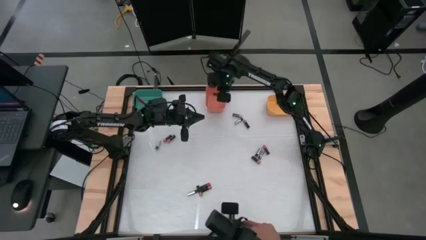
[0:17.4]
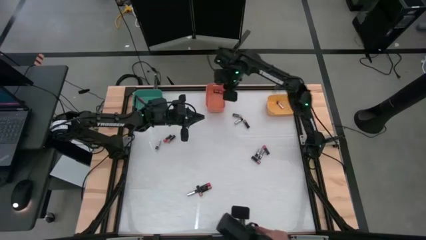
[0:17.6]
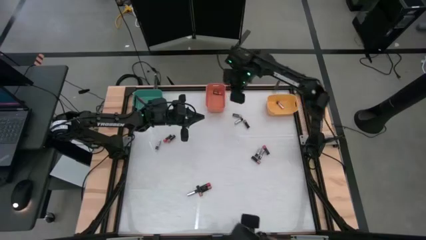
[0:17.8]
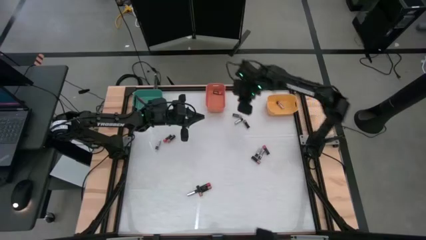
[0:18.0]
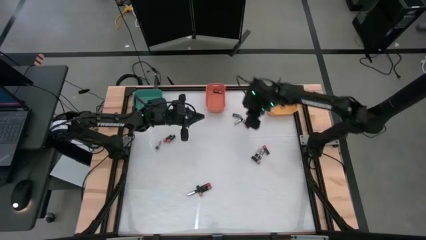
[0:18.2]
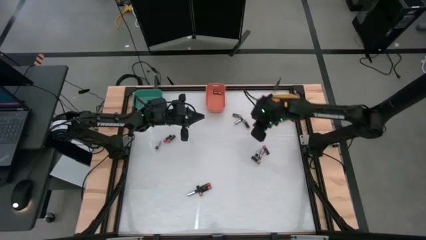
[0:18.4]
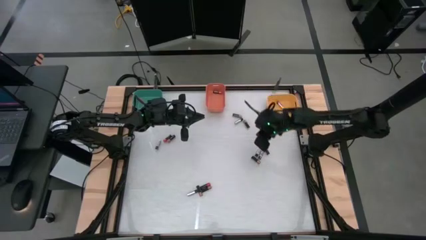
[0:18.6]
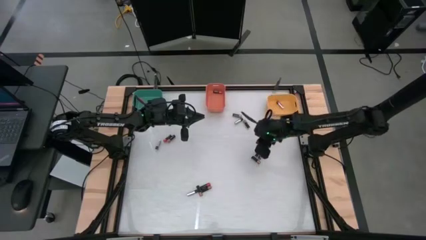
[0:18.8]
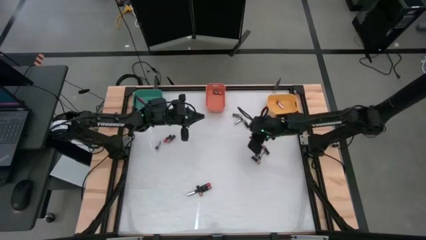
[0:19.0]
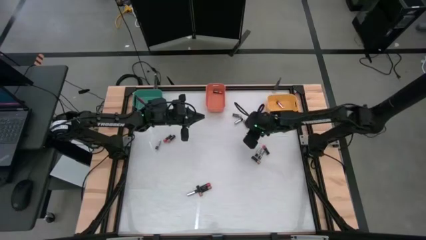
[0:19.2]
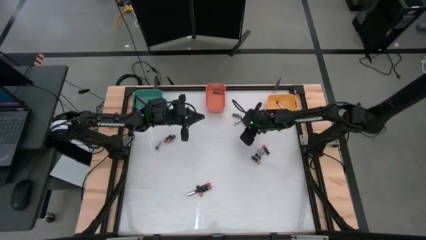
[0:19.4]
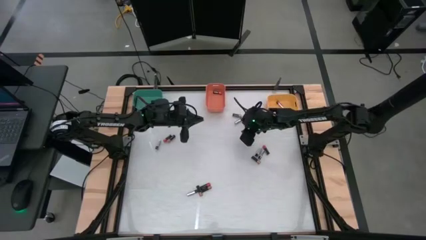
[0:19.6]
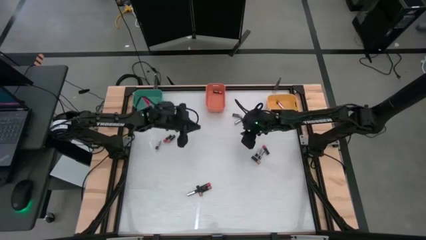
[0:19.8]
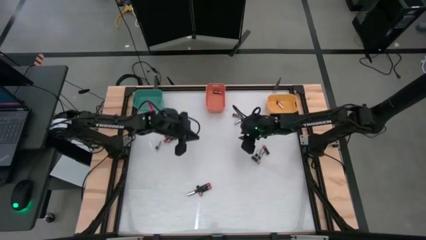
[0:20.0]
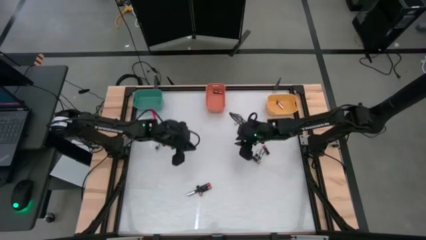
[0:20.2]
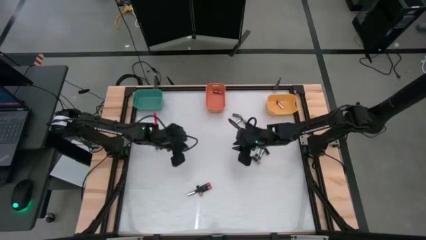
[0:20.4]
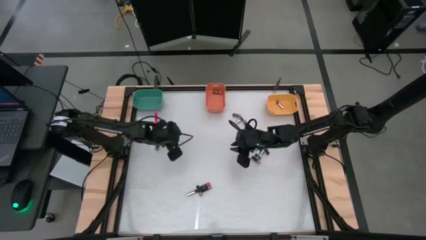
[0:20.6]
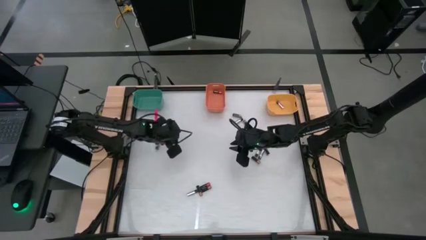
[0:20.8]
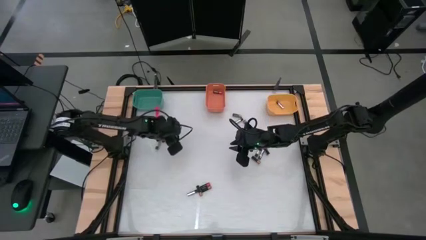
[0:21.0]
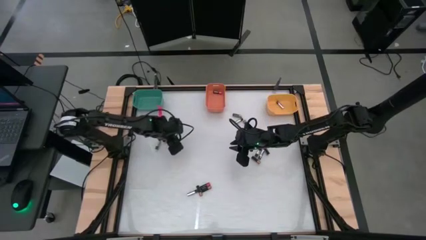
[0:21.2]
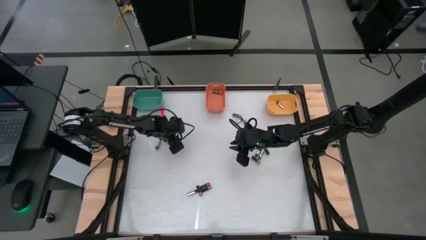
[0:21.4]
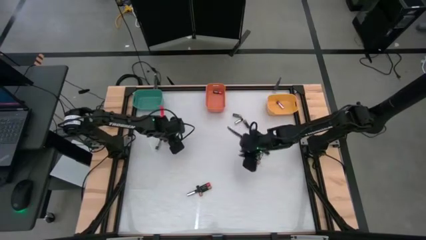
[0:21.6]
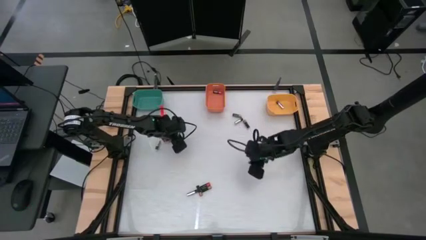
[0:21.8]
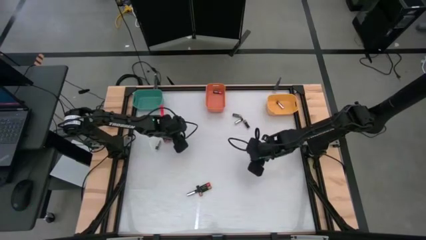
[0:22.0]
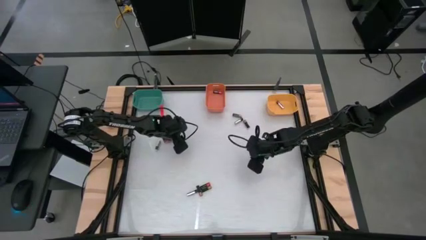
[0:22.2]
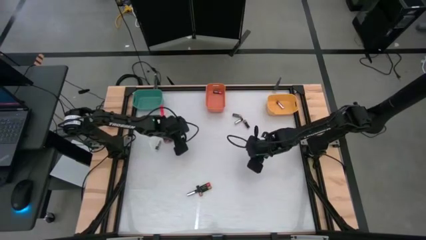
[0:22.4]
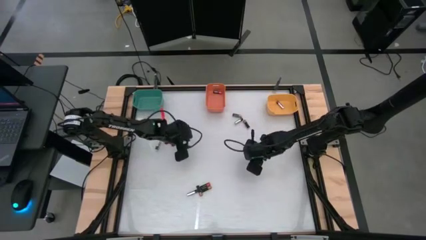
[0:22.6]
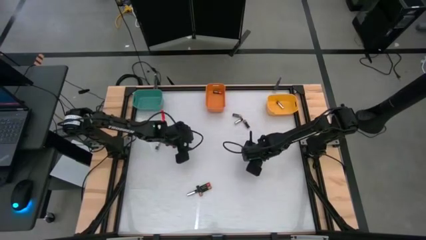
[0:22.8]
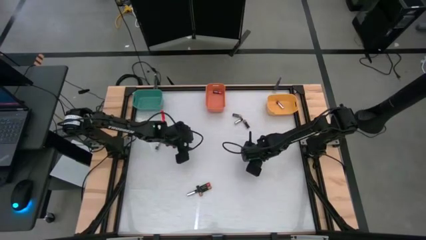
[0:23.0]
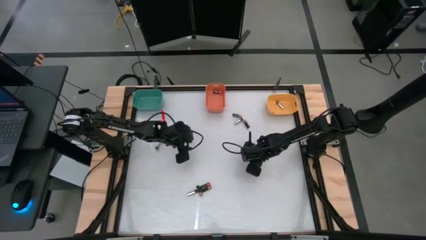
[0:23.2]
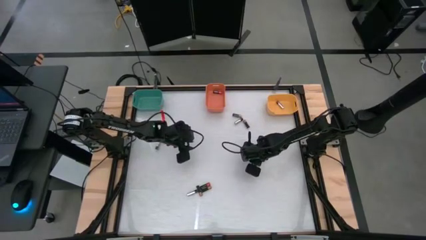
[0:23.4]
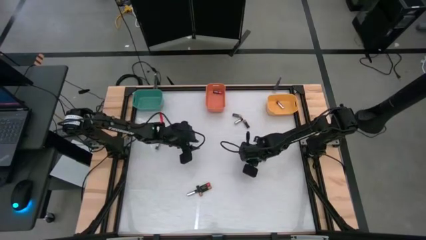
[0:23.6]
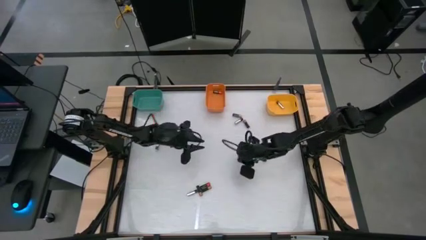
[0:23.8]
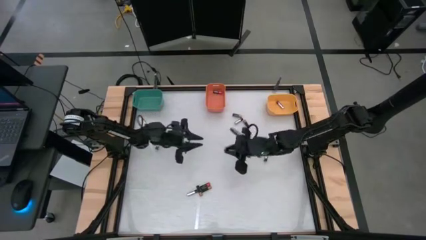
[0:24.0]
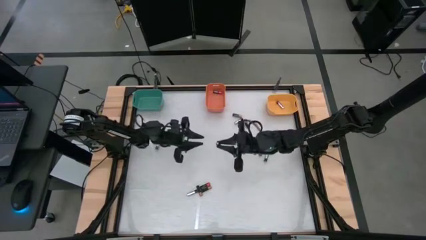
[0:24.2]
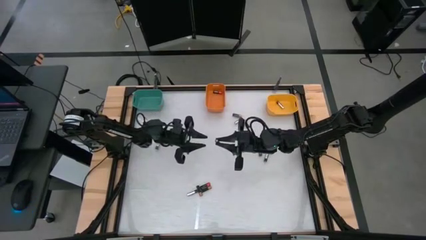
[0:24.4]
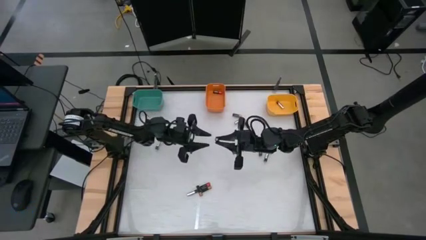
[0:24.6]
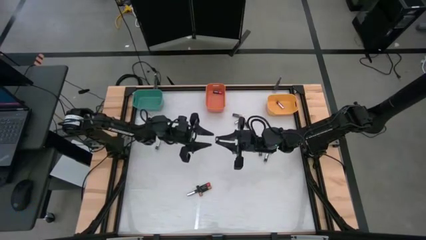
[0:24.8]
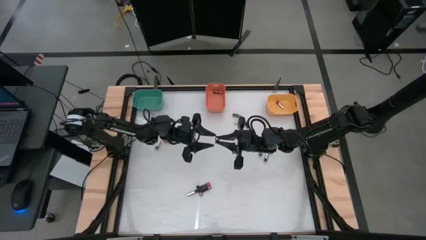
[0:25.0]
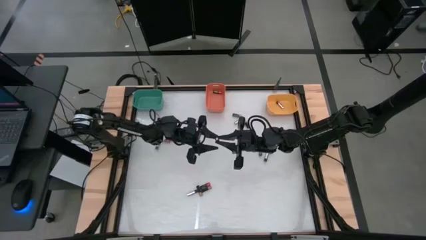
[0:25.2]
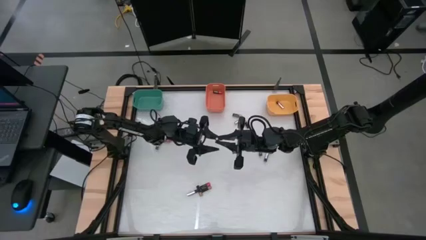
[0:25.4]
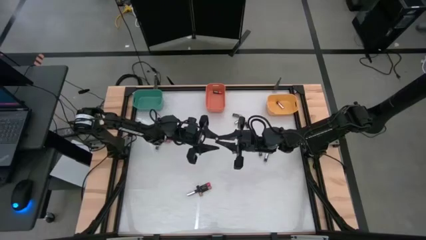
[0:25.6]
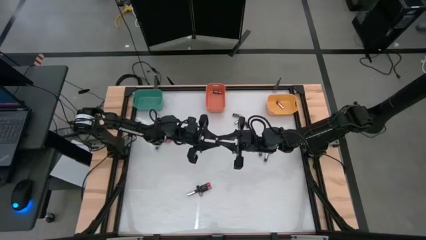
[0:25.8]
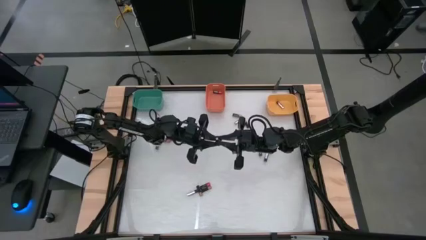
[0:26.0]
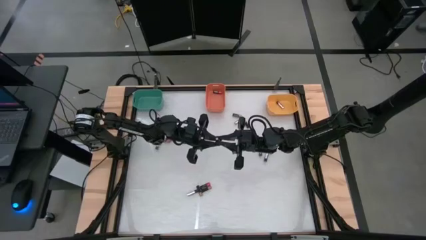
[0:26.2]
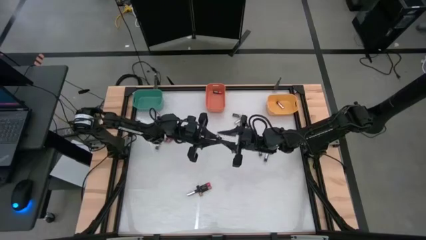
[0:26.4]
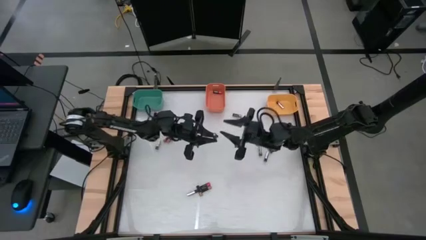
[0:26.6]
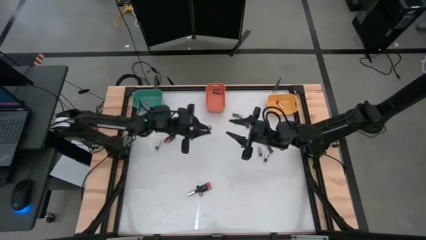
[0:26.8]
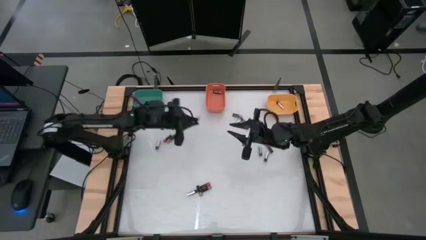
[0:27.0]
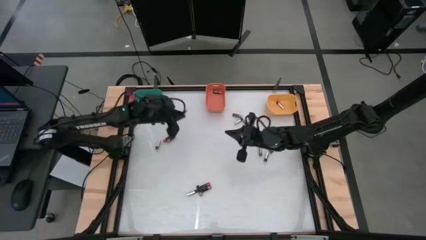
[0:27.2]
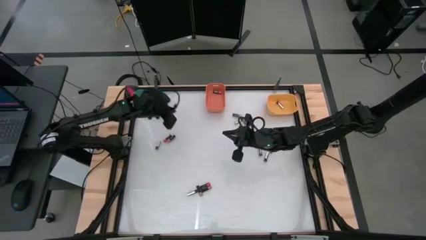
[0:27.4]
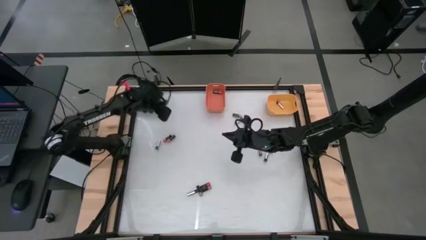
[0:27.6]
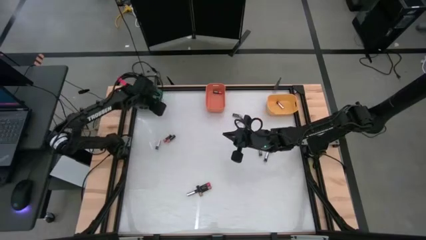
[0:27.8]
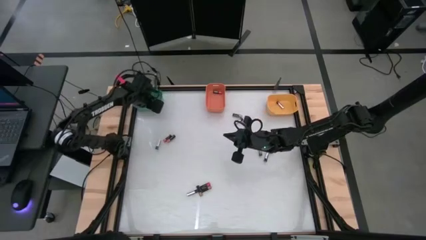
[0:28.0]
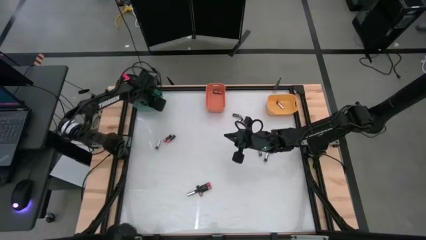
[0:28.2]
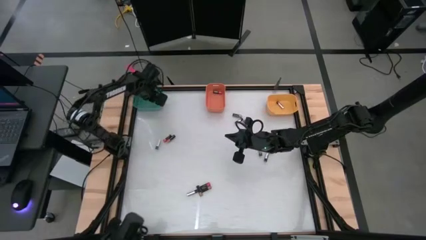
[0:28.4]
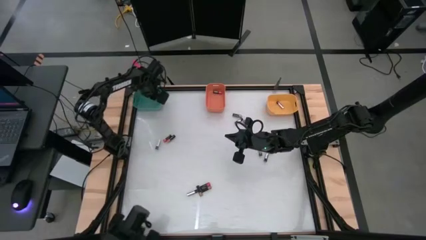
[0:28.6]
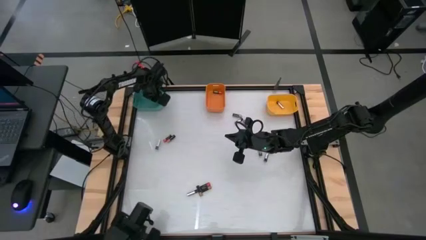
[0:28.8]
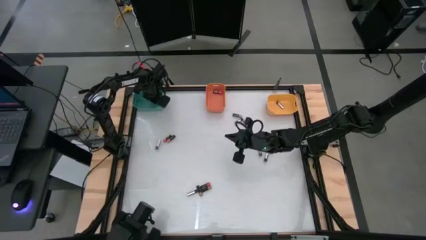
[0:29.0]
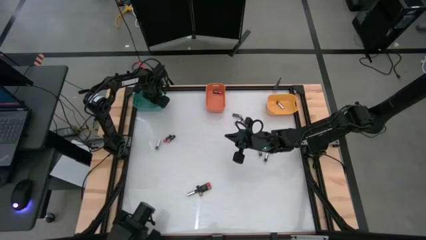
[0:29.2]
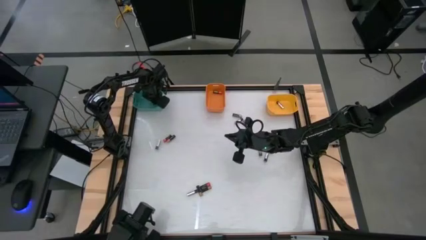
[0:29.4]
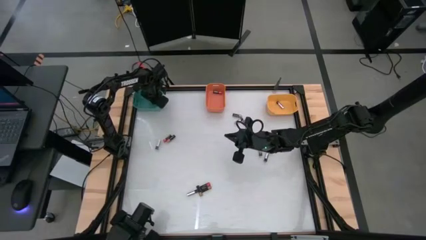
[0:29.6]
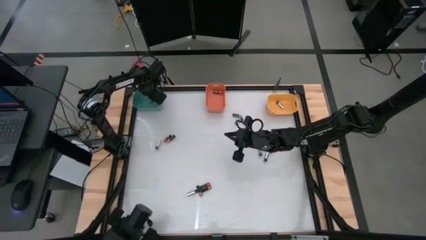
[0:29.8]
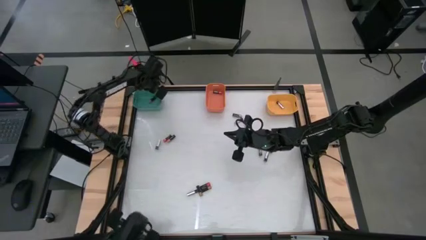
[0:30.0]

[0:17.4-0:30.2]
Task: Sort batteries
Put the middle right copper battery into the green container
